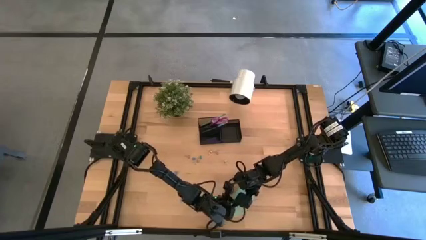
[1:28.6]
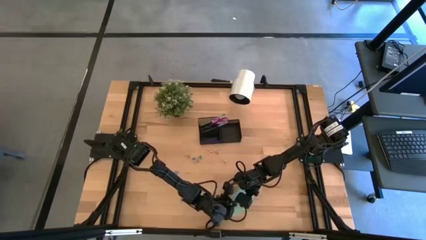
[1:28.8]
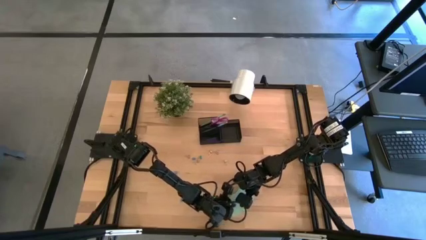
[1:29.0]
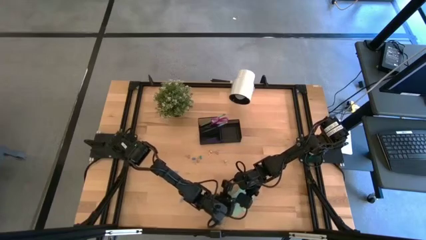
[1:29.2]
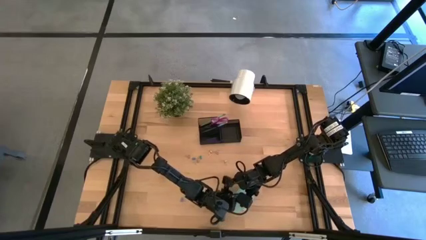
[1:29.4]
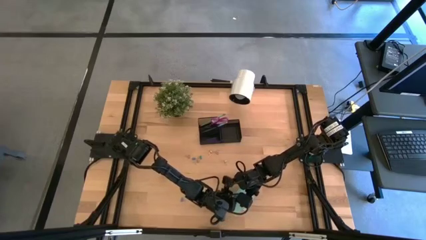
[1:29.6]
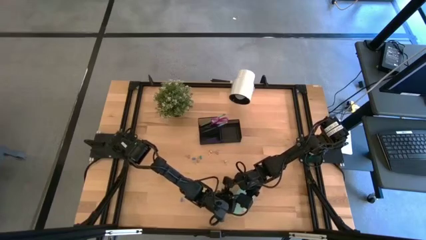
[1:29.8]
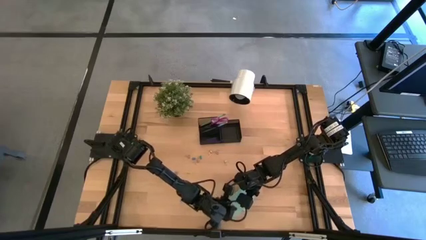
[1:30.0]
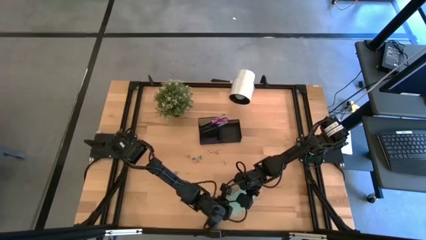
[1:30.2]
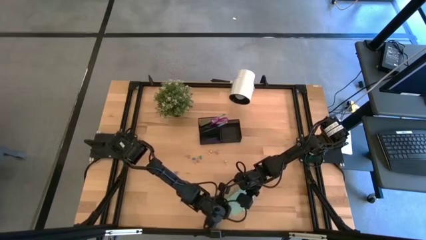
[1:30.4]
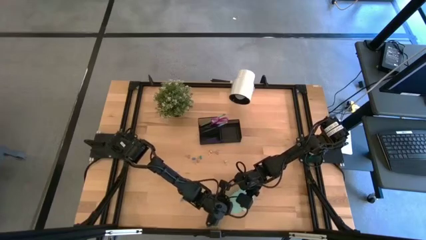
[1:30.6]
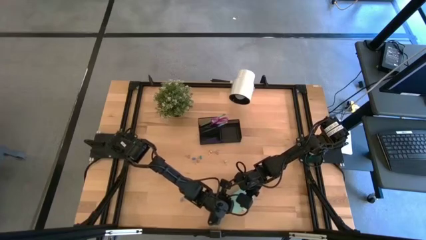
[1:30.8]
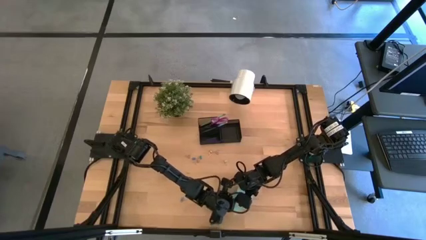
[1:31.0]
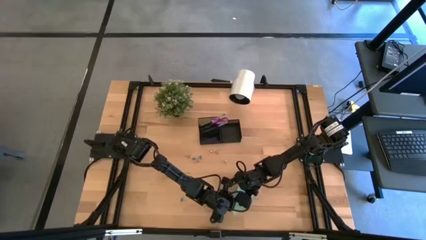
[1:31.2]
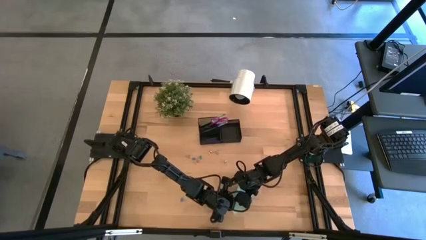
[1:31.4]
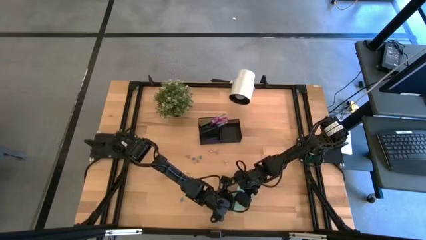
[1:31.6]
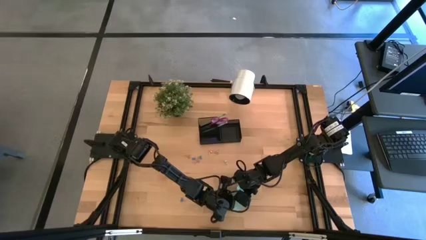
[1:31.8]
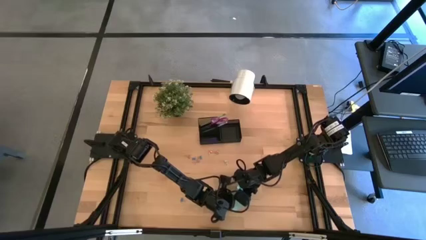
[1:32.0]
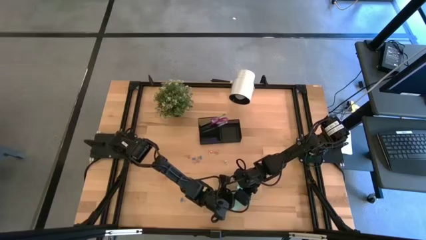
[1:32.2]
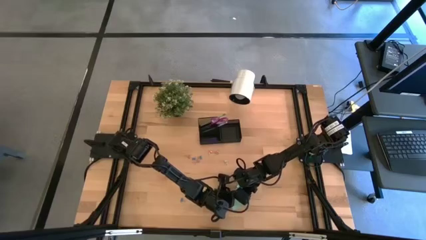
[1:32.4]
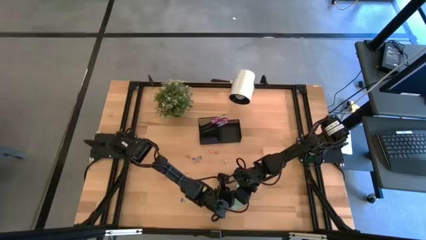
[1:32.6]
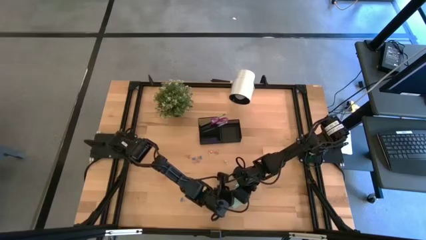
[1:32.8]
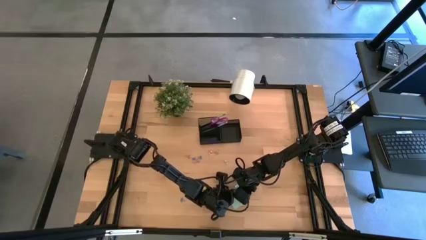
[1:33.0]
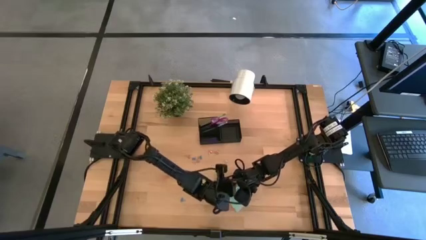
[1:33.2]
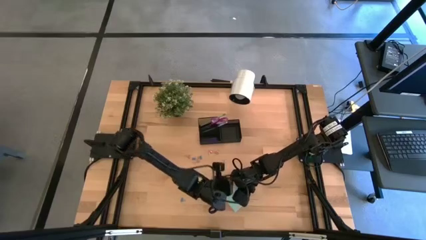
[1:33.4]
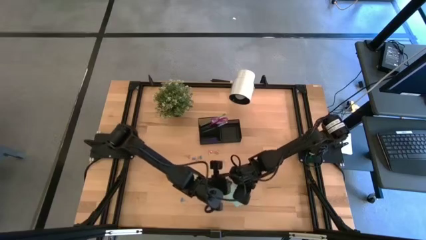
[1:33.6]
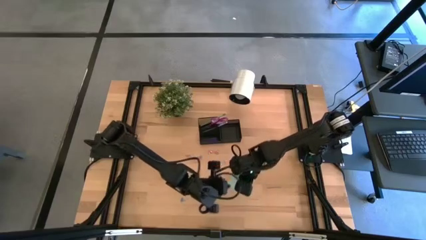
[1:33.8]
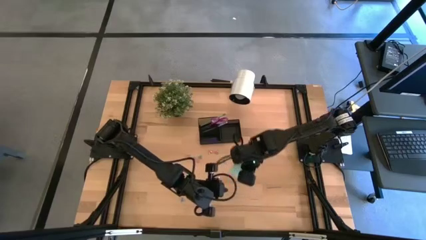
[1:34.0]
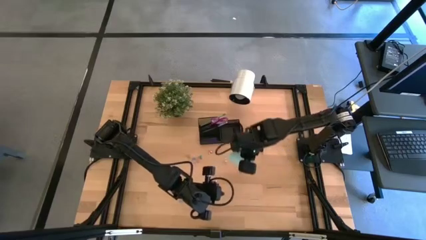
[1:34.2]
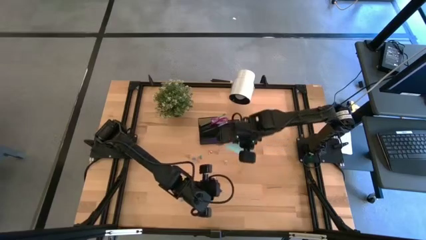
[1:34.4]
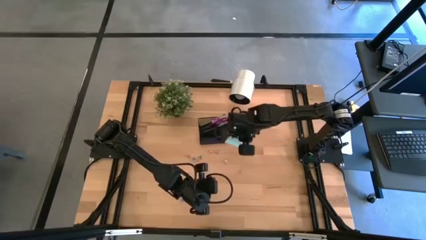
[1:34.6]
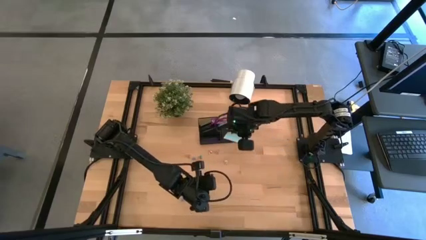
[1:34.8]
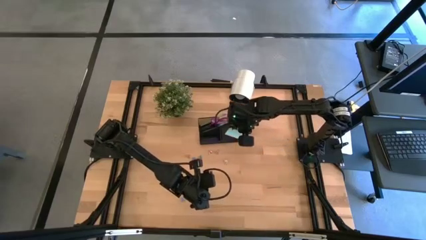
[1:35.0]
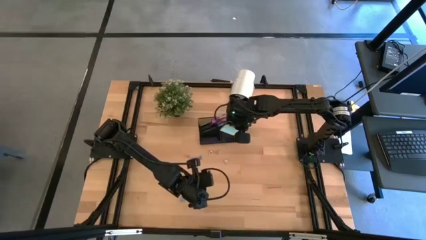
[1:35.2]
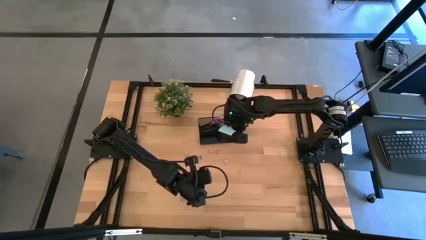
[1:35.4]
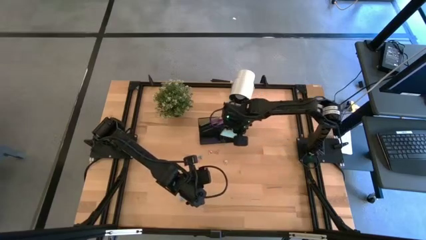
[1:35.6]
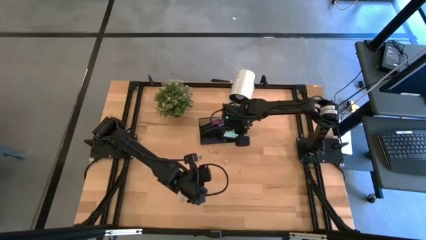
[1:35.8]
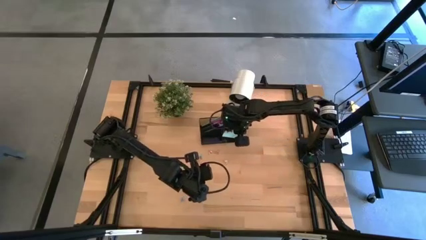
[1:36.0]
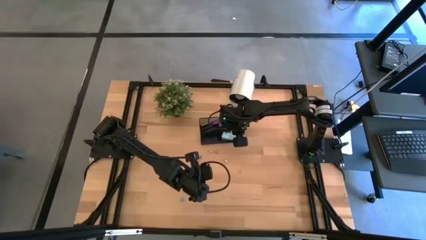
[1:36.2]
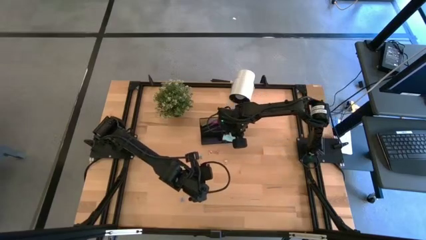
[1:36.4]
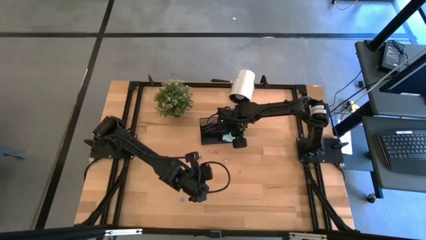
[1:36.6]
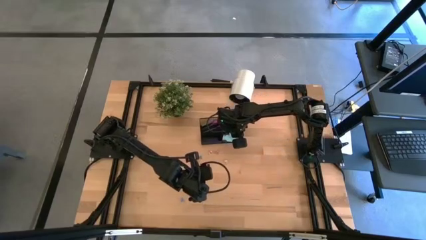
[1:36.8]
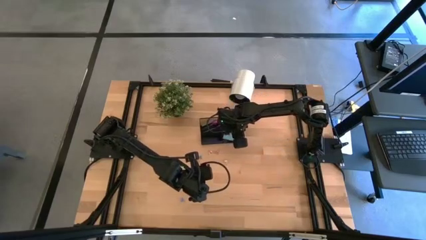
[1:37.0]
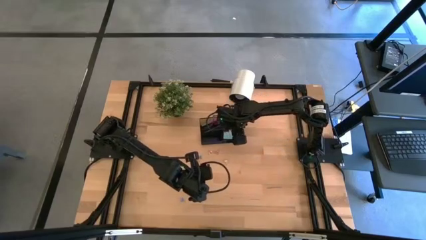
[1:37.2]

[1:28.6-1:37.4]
Task: Pick and place office supplies into organizer
Put the blue sticky notes into the black desk organizer

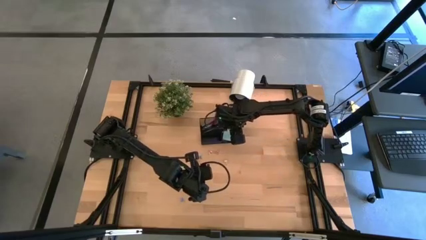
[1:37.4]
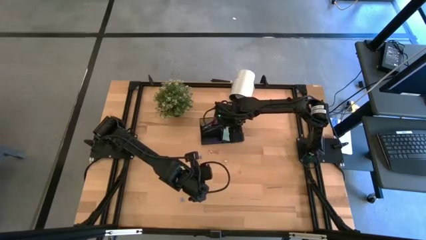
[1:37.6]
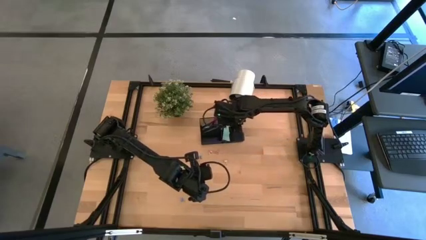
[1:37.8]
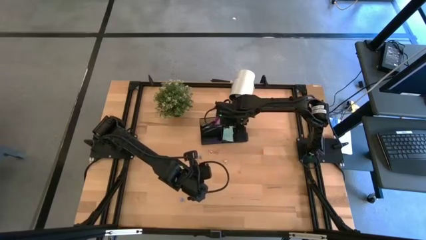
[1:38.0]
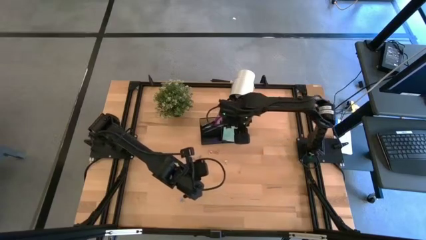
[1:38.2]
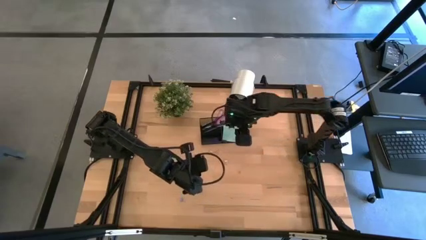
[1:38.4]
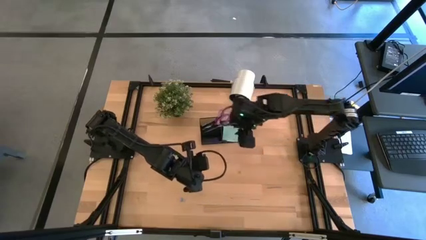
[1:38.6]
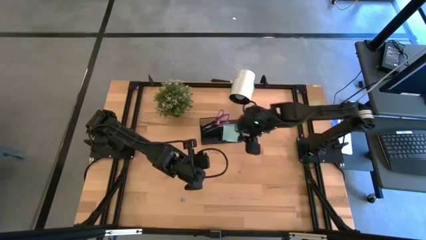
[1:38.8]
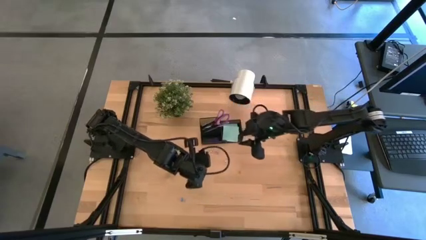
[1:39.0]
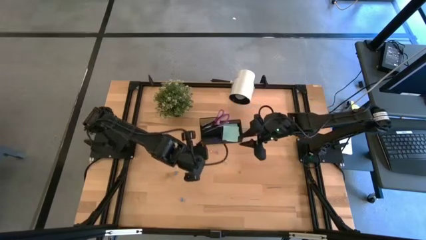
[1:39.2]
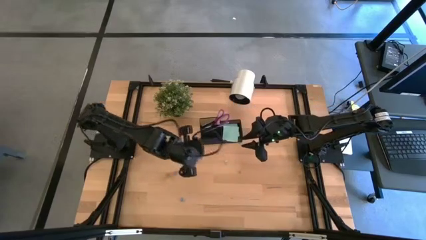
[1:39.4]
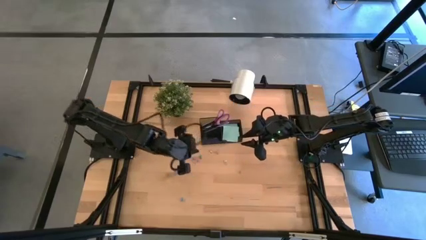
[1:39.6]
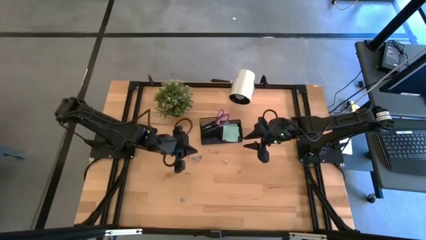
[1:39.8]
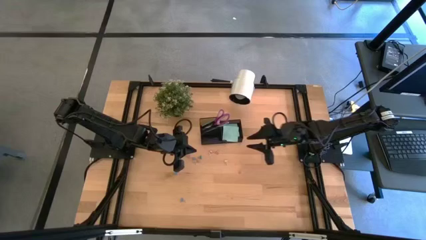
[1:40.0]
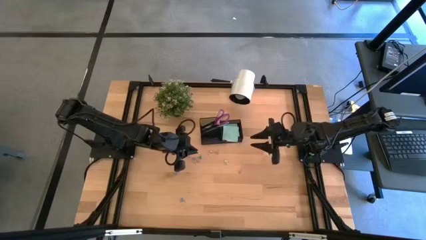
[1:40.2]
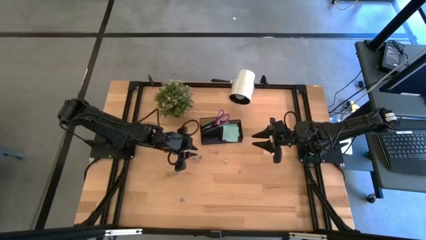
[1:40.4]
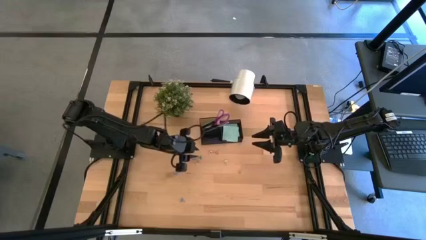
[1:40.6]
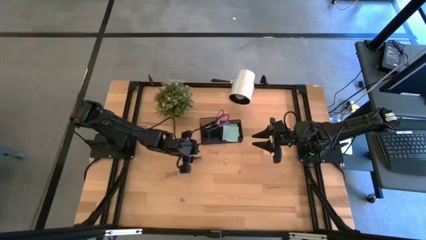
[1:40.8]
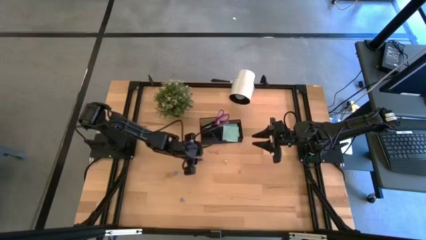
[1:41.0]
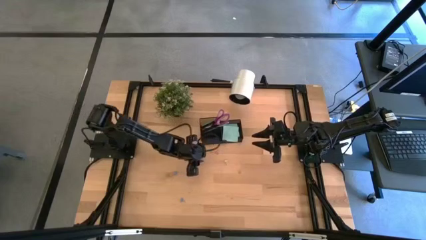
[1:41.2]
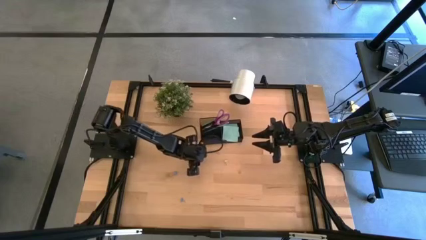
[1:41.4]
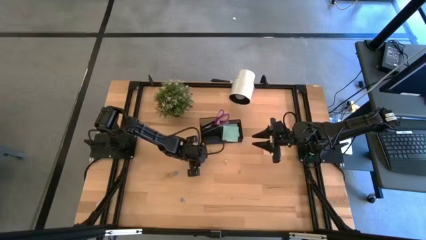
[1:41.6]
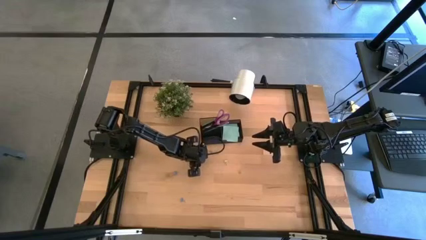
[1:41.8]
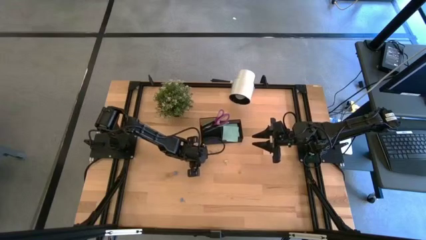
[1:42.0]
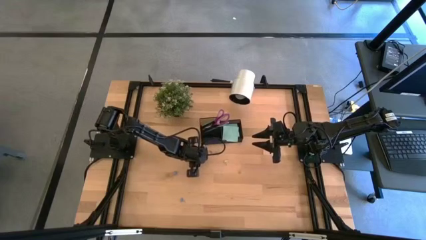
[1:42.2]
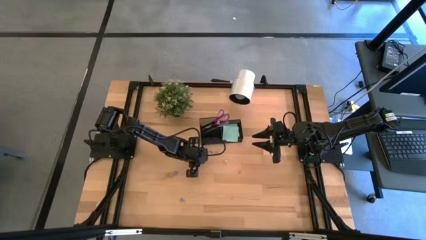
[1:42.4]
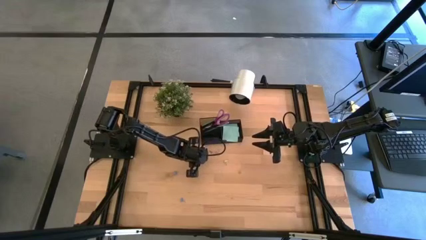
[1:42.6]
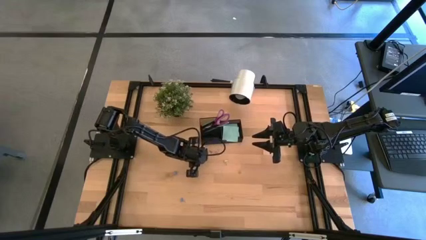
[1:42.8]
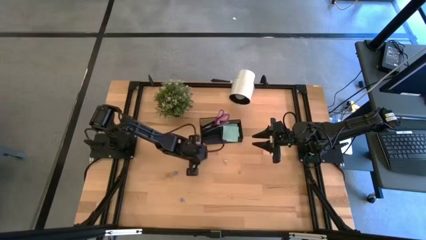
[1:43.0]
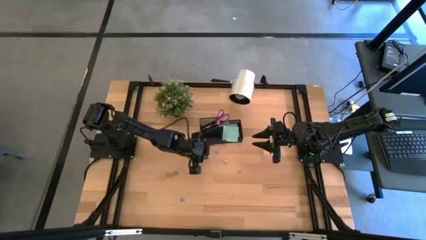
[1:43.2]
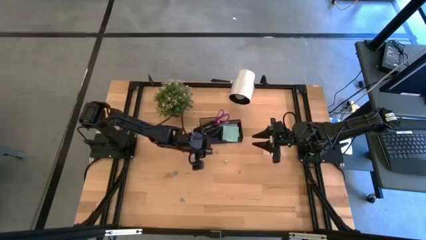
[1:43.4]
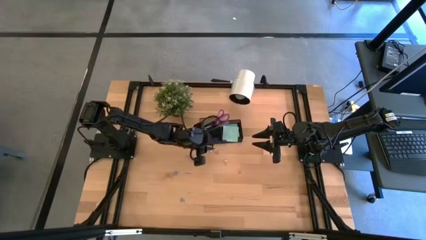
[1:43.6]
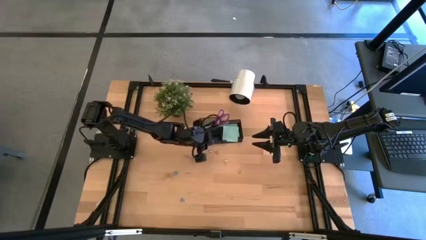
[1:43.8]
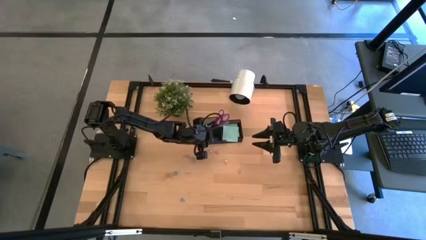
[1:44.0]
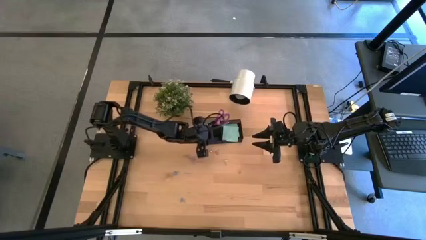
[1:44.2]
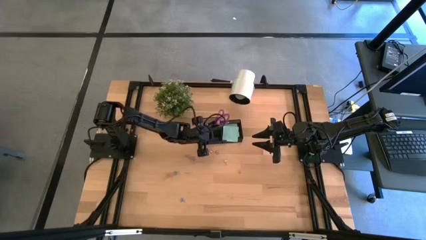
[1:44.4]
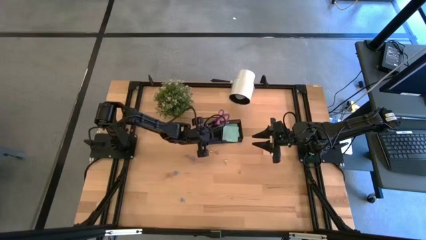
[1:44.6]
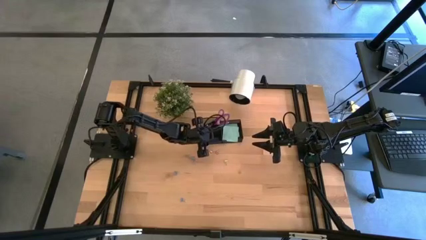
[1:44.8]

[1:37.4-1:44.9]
Put the blue binder clip into the black desk organizer
